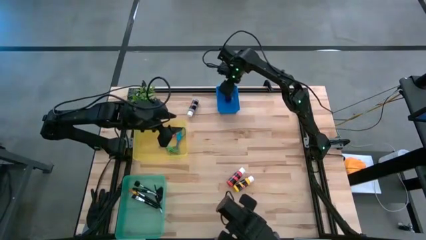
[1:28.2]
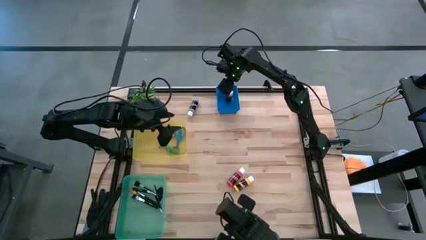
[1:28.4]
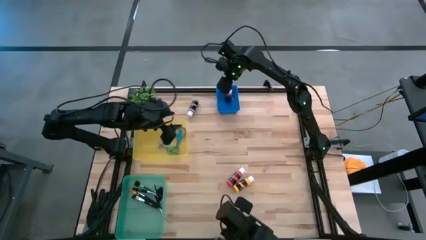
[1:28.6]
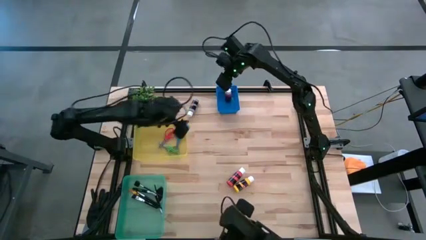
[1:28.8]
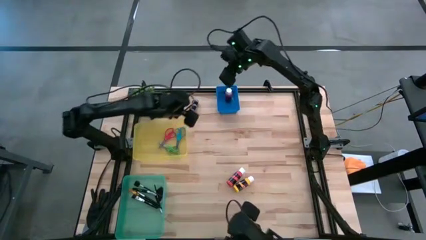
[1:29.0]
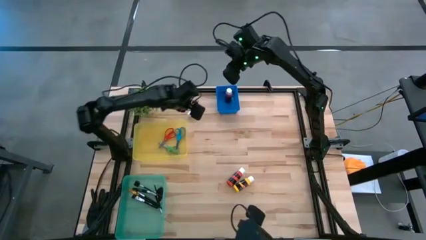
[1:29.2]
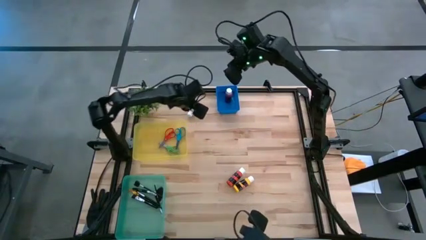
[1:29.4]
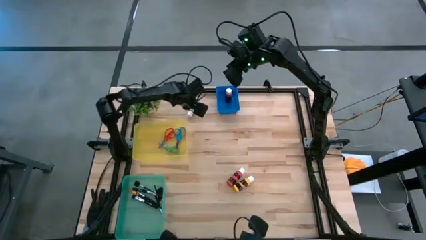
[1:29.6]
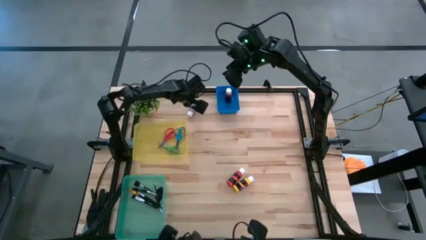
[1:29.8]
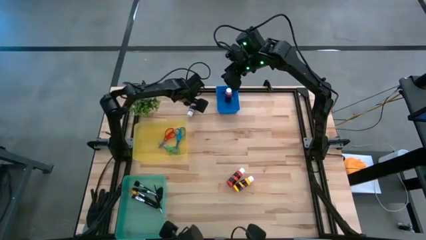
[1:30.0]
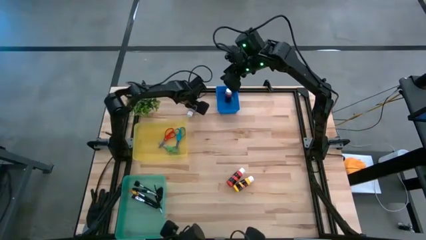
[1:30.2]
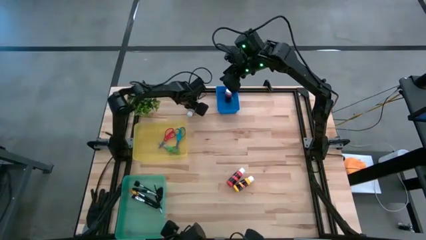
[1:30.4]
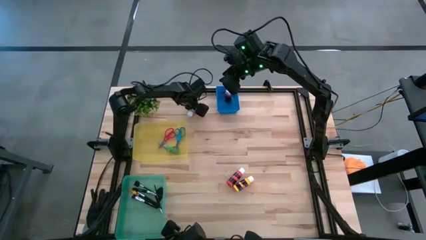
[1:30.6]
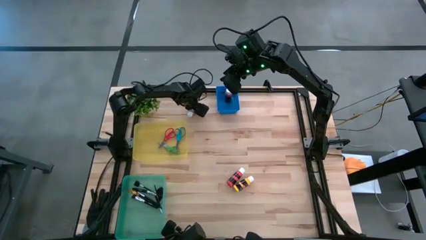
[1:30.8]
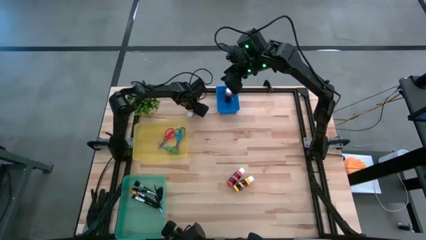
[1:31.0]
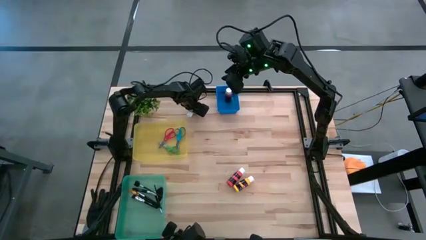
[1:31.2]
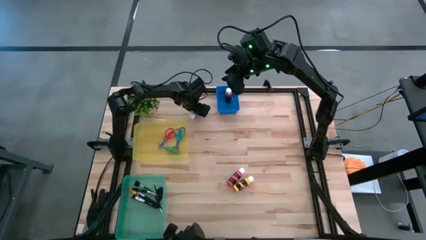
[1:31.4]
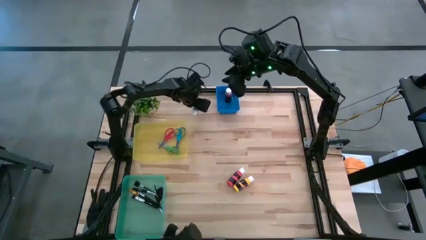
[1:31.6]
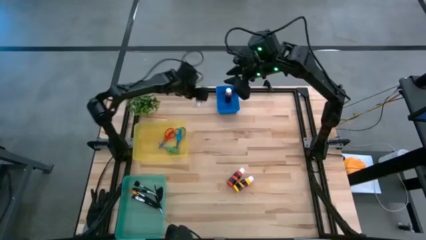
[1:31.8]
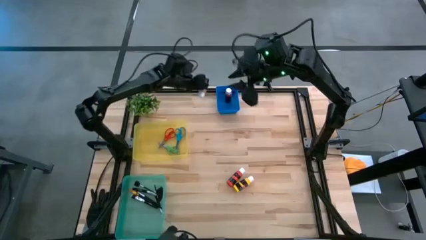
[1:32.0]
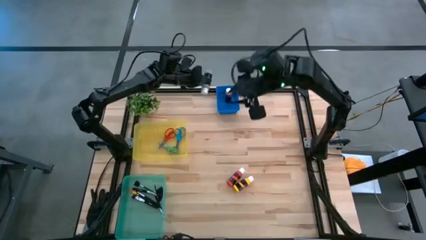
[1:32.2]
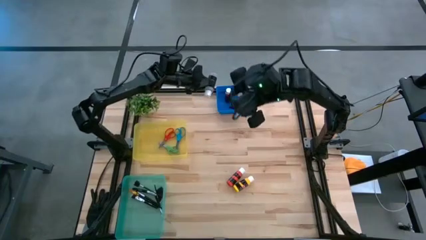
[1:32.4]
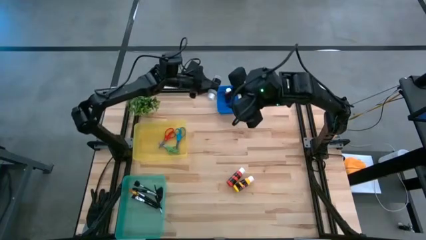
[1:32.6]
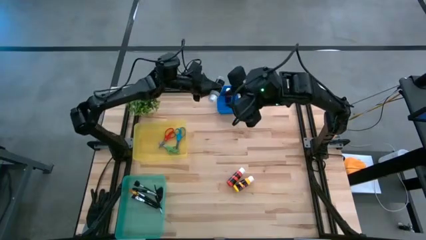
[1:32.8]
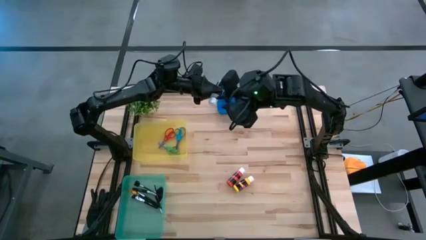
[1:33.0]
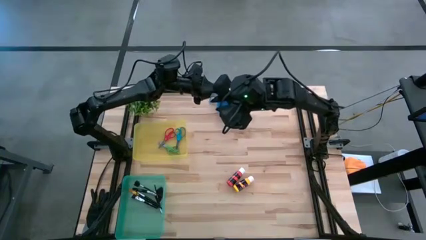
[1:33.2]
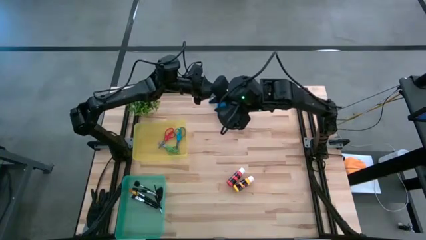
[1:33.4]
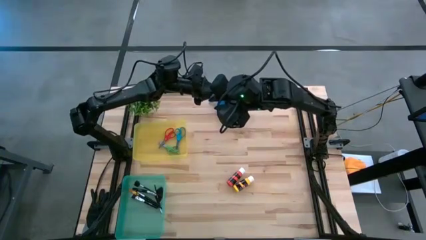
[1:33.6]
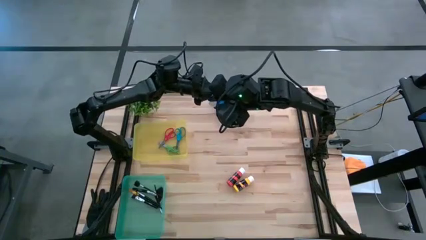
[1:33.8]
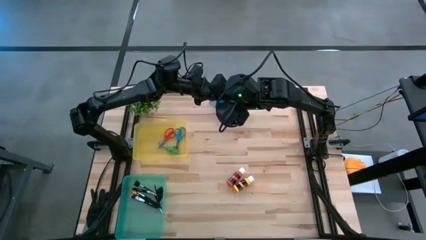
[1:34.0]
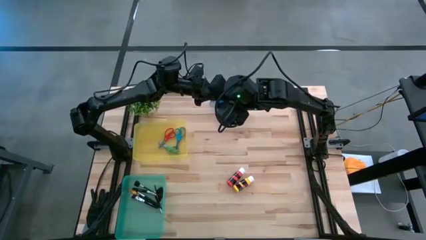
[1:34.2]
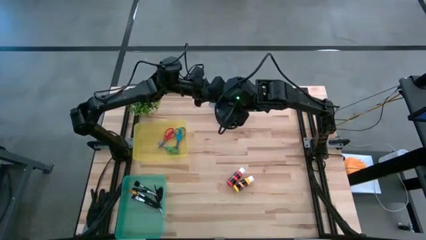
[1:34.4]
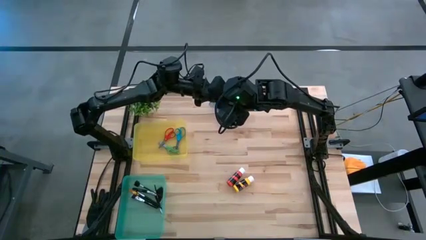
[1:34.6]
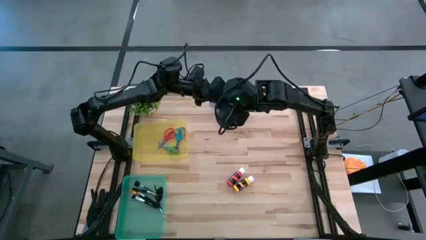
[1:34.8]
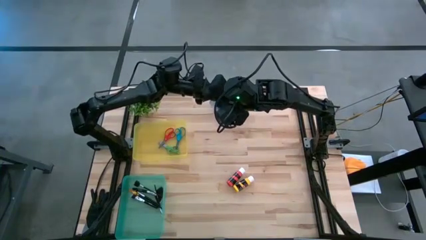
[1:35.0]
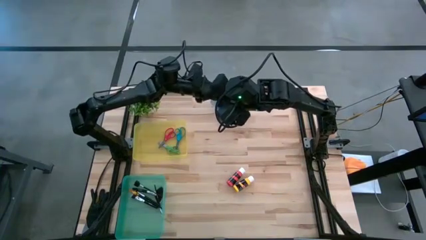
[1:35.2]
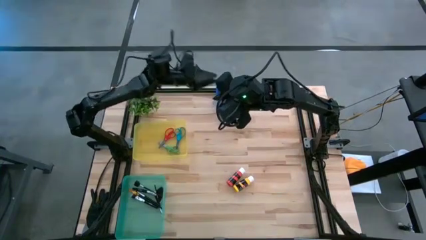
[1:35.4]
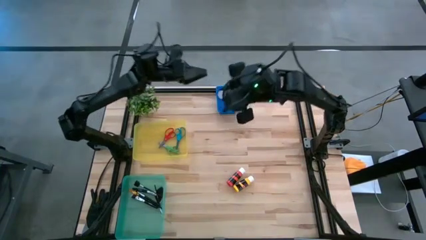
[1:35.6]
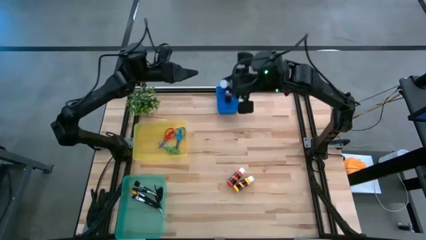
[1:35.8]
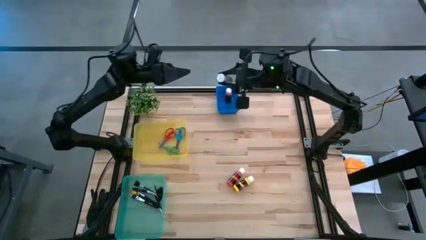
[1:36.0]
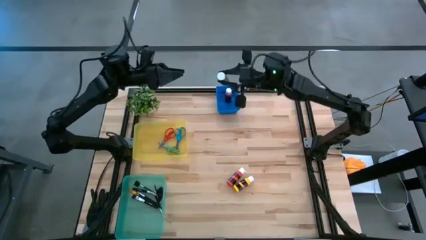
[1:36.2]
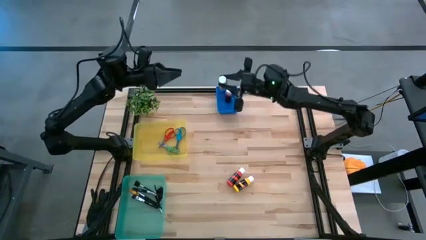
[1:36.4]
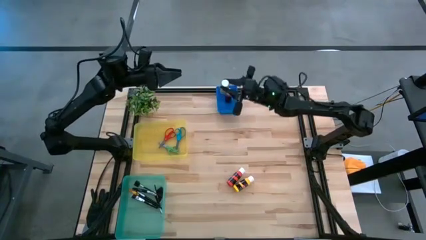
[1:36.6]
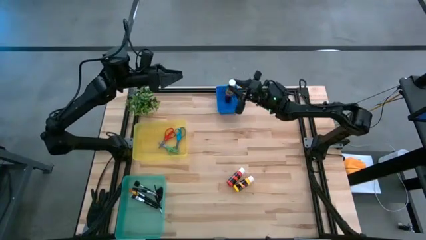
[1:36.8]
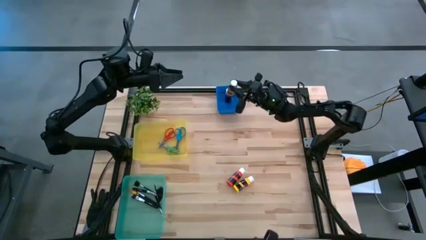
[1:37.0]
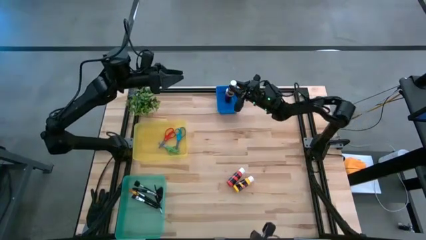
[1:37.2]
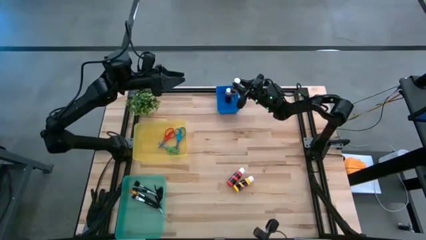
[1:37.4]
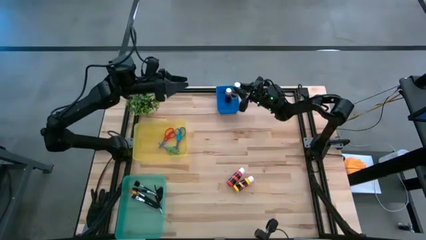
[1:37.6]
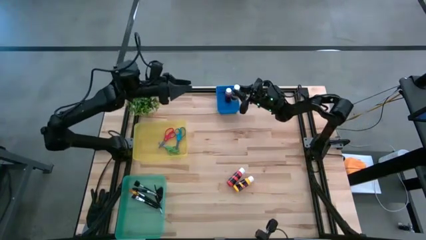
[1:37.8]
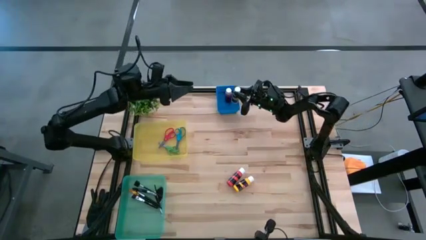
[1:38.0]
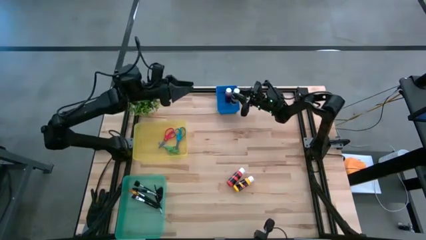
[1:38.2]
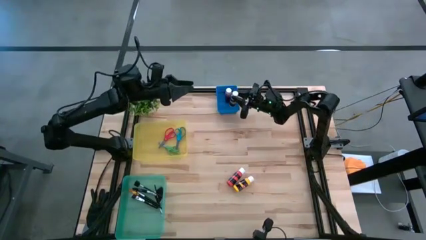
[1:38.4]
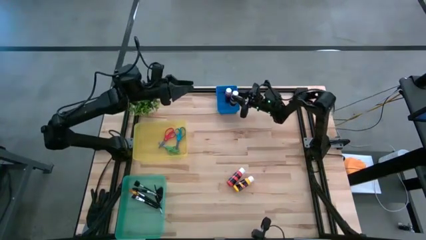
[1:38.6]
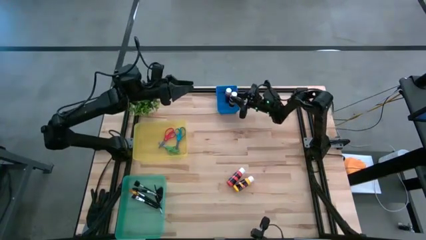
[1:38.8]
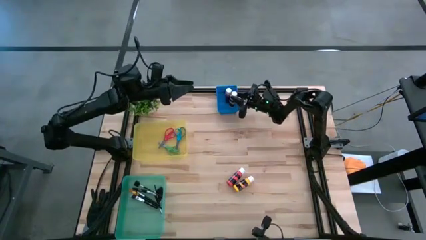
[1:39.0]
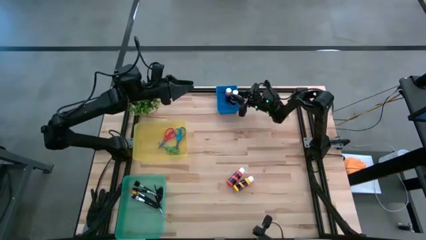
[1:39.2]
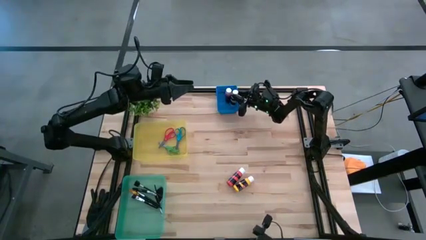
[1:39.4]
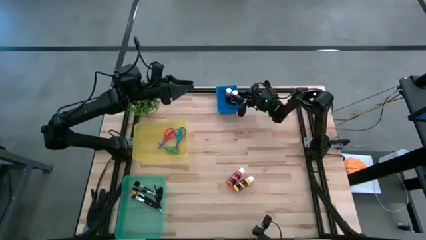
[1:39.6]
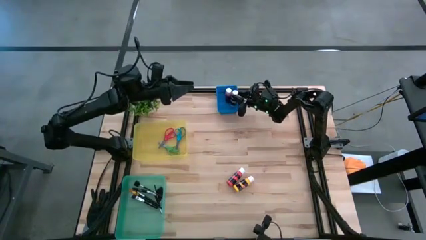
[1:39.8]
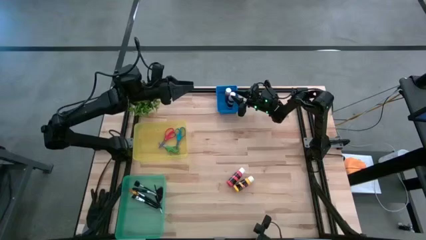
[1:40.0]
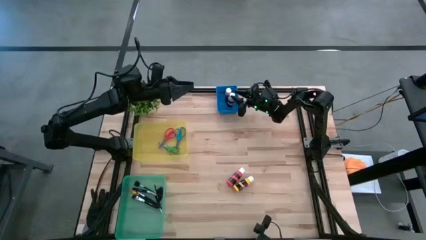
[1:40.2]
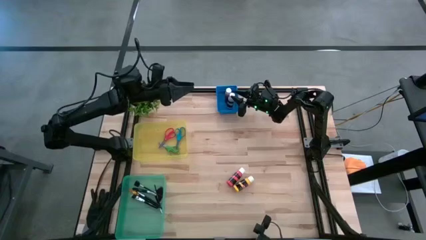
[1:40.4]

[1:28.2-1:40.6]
Task: Pick & Place Paint Supplies
Put the gray paint bottle into the blue bin

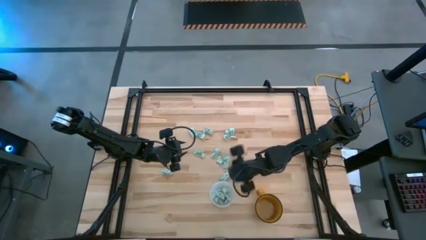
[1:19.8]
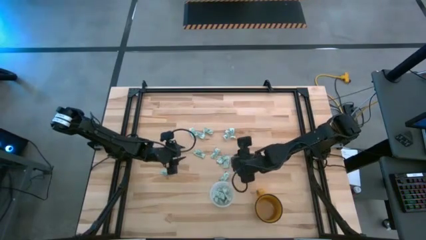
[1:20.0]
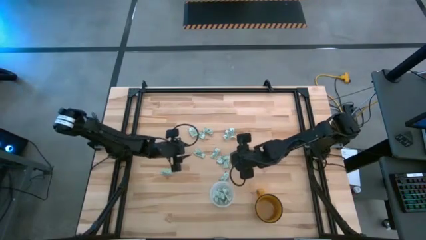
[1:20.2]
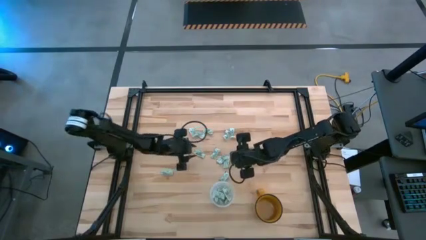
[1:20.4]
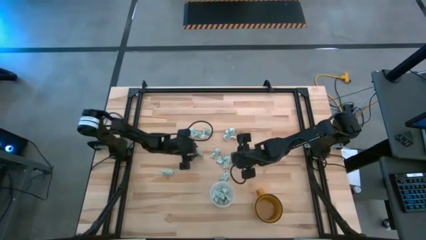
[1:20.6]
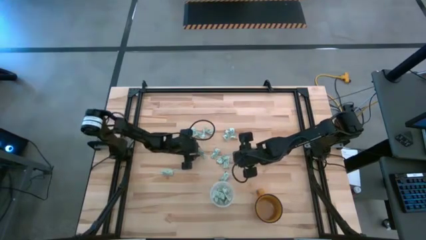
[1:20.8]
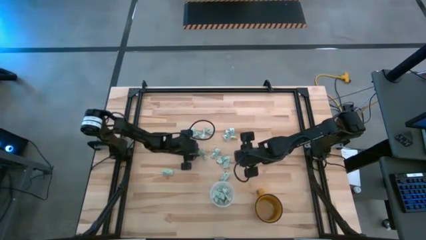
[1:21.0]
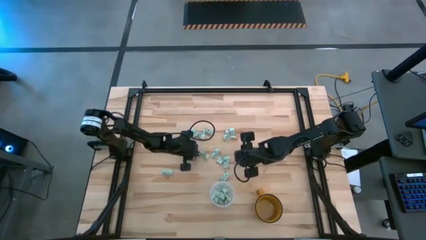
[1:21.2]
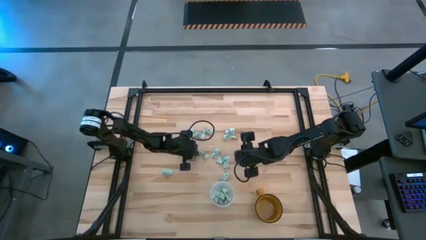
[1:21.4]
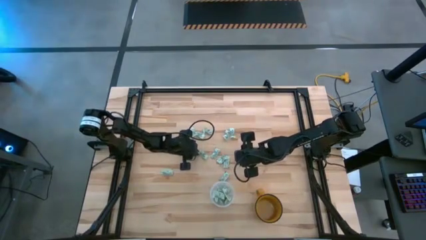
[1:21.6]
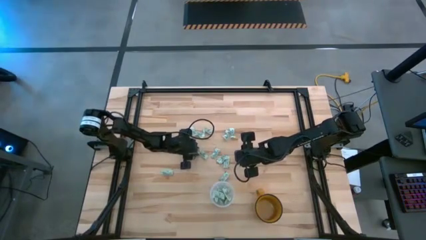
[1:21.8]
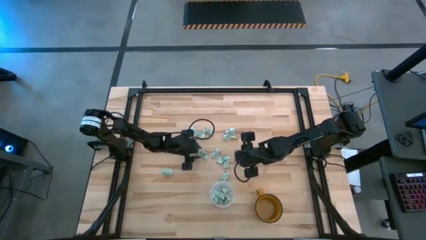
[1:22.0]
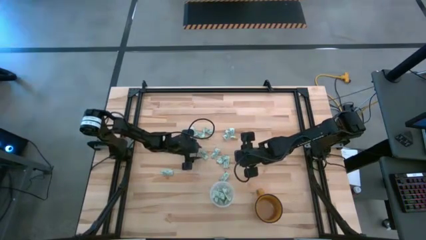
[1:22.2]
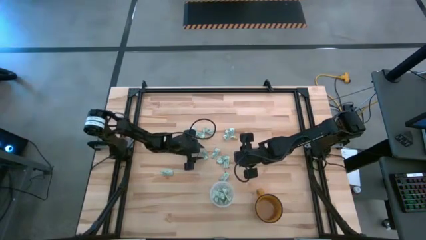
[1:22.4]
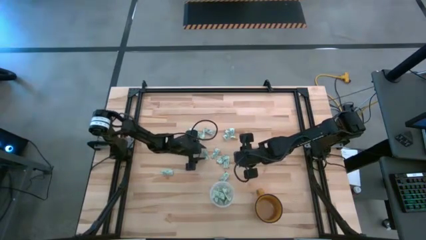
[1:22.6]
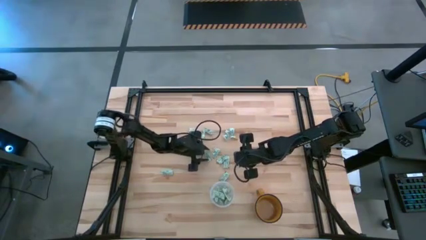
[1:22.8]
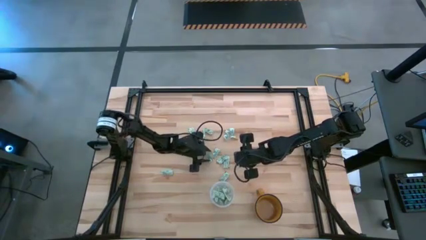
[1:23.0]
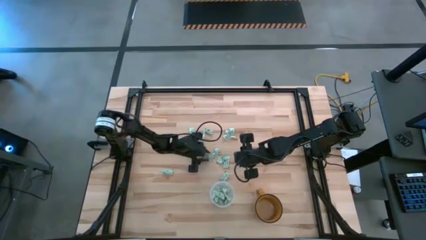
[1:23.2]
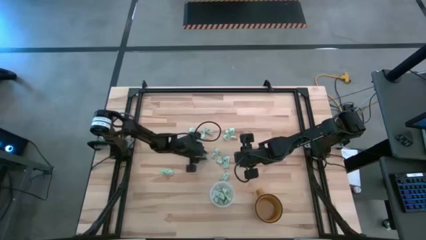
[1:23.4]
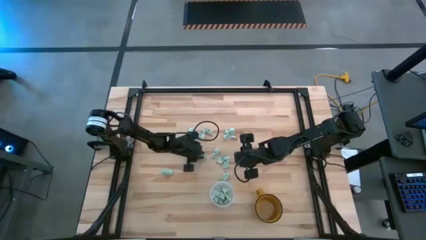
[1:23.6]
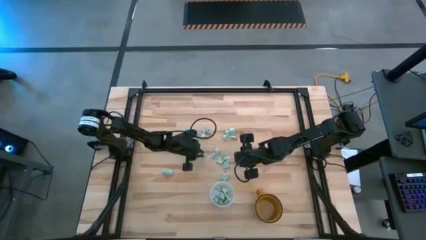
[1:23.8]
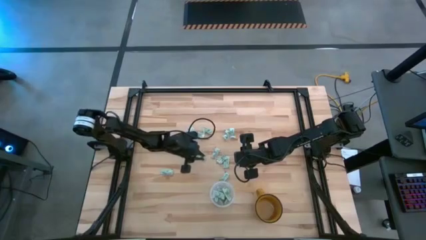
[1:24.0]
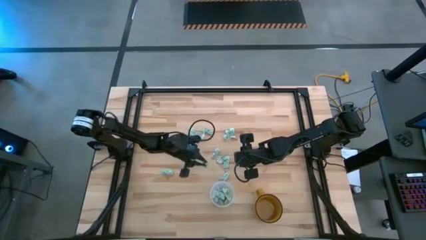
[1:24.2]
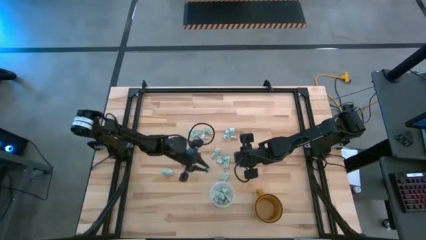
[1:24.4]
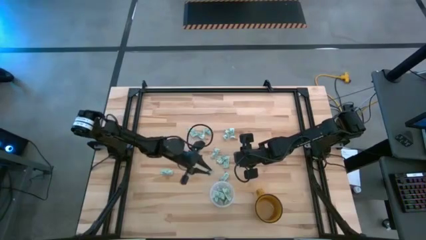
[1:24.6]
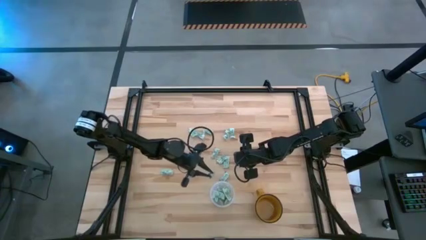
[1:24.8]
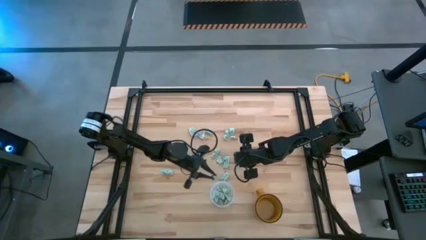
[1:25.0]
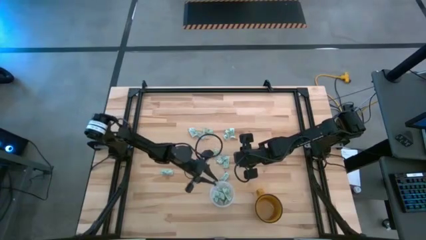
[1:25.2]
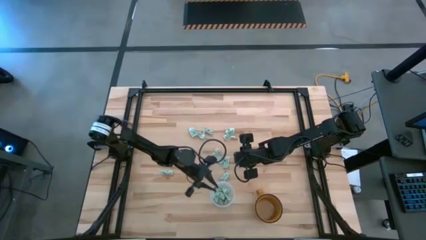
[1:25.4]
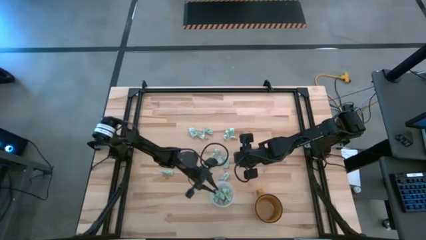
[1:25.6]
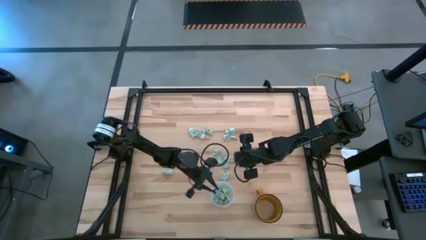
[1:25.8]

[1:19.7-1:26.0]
Task: Pick and place Stevia / Truvia into bins
Put the stevia packet into the transparent bin
